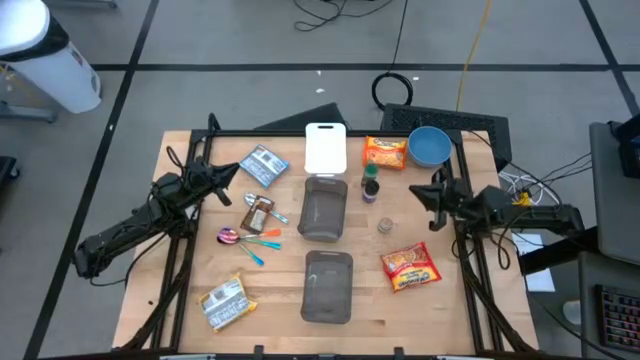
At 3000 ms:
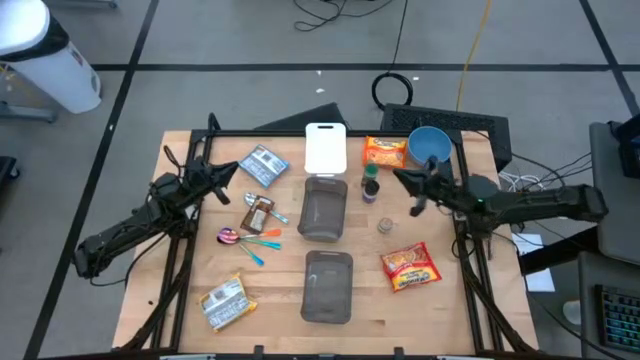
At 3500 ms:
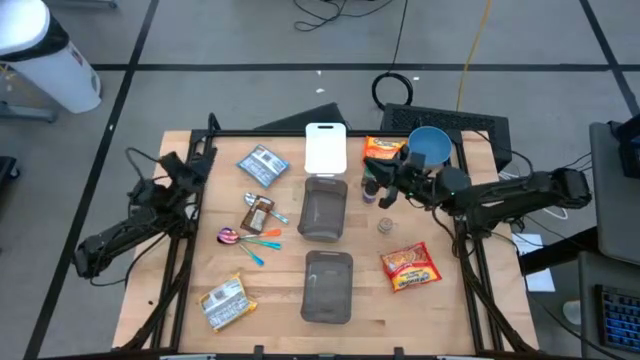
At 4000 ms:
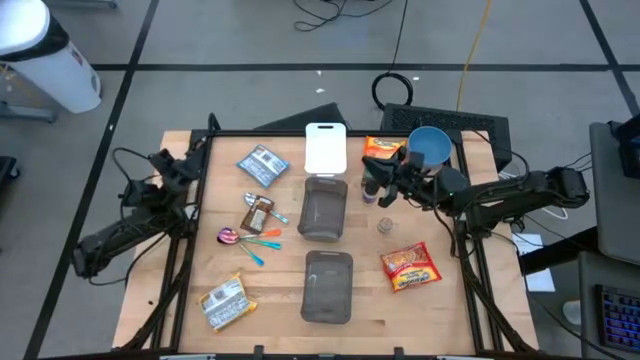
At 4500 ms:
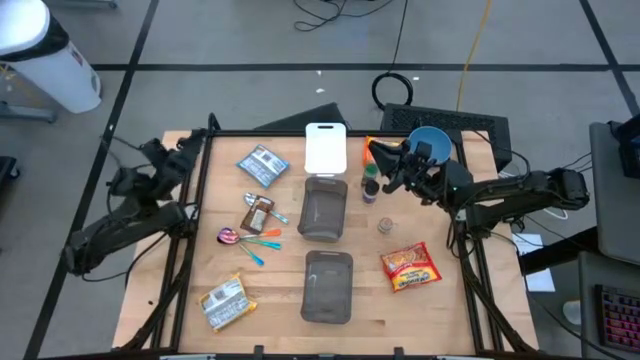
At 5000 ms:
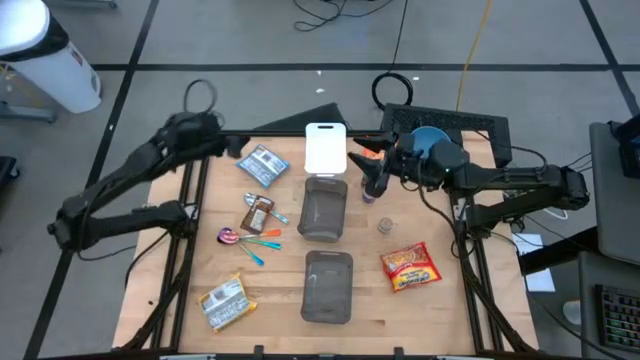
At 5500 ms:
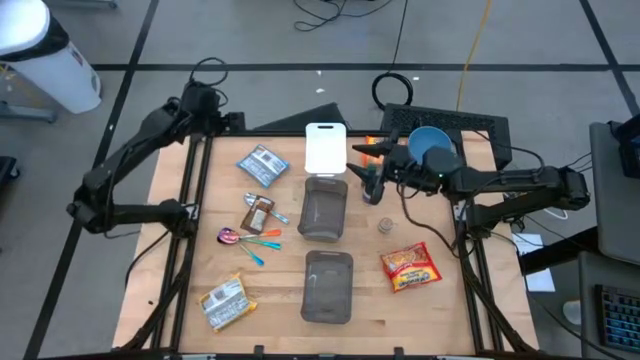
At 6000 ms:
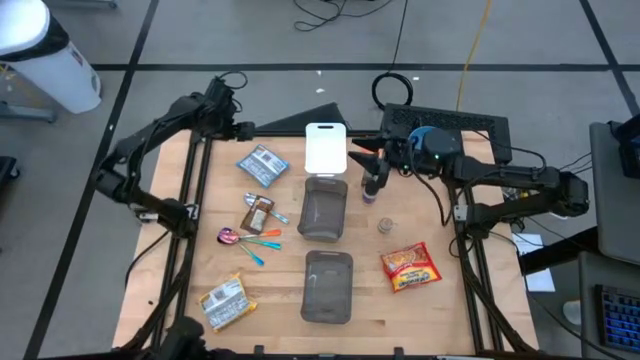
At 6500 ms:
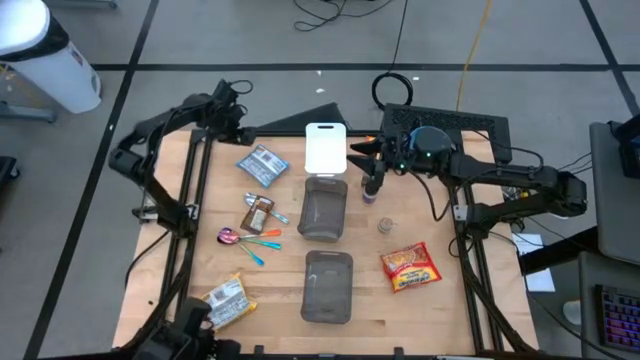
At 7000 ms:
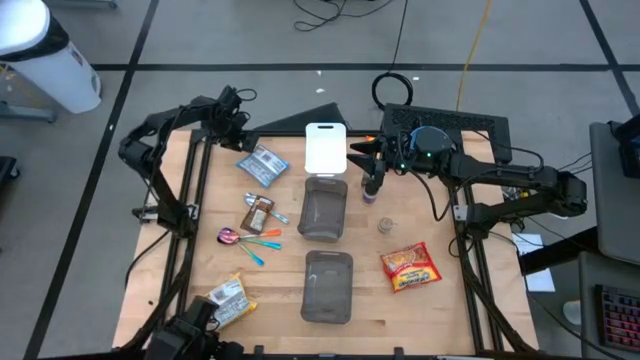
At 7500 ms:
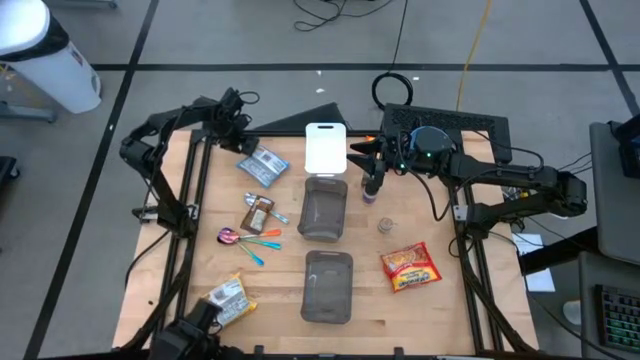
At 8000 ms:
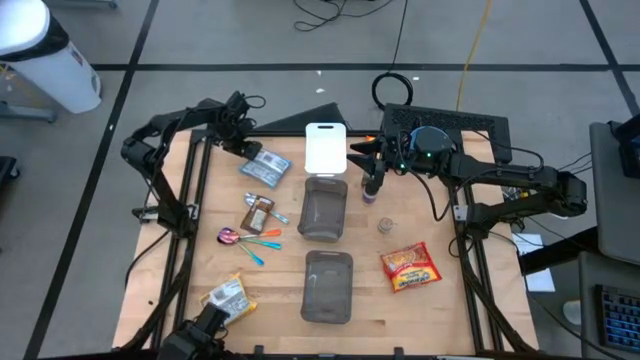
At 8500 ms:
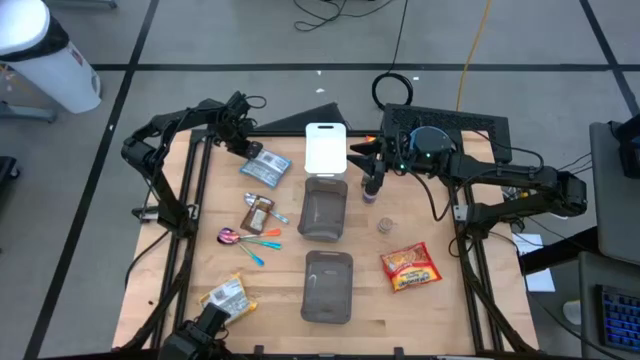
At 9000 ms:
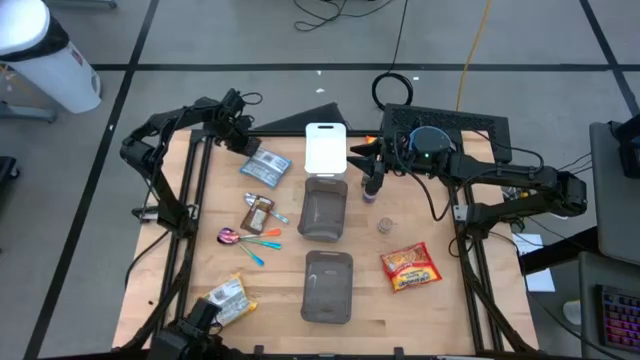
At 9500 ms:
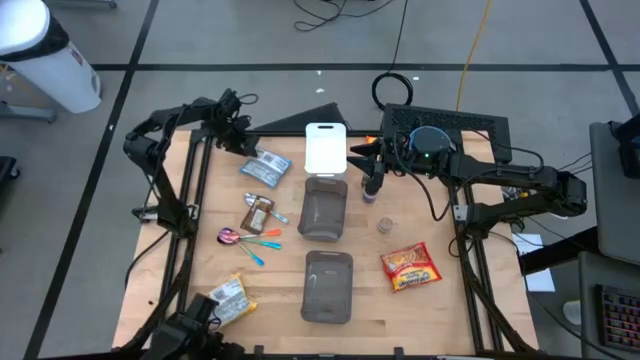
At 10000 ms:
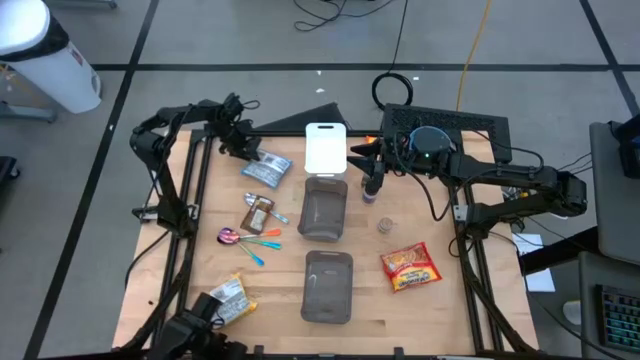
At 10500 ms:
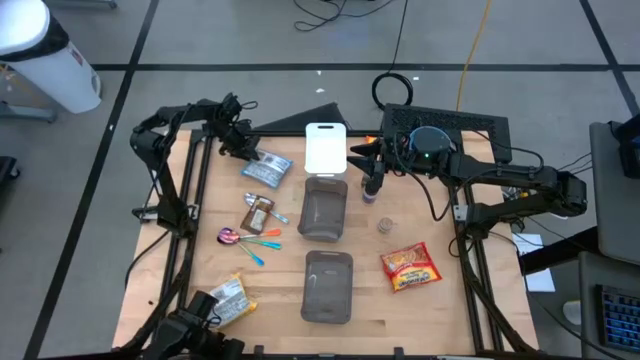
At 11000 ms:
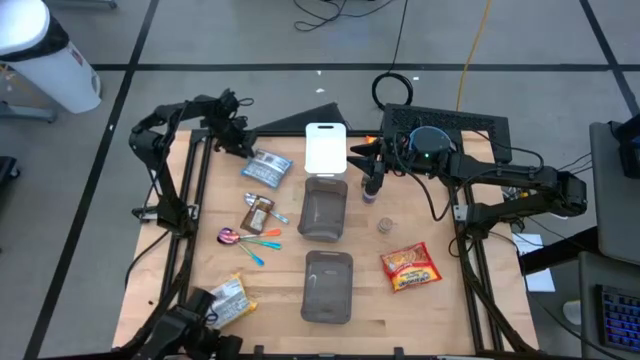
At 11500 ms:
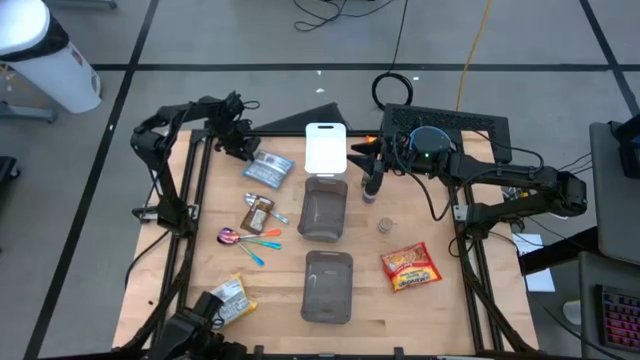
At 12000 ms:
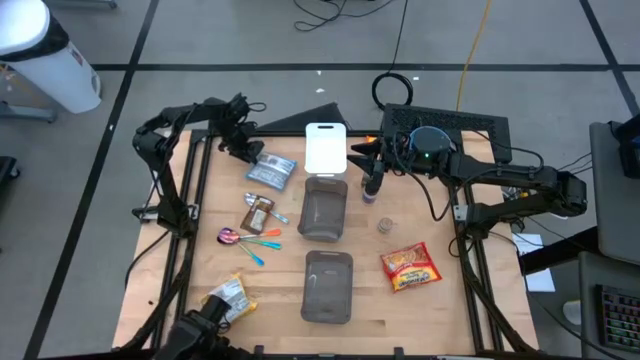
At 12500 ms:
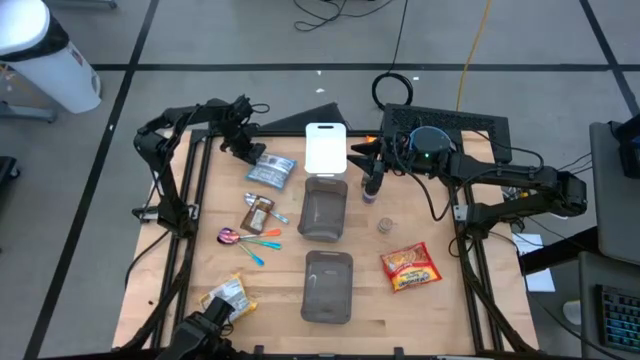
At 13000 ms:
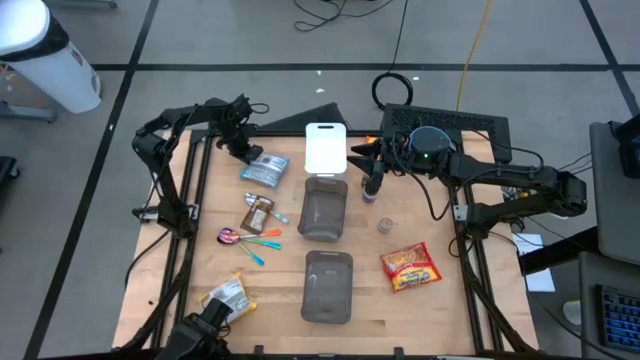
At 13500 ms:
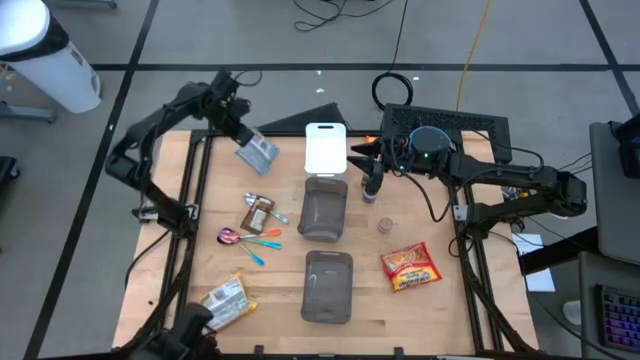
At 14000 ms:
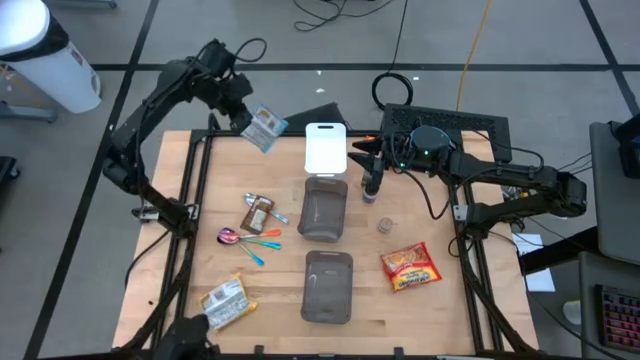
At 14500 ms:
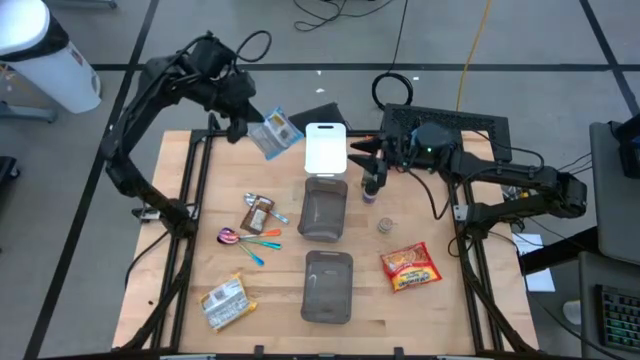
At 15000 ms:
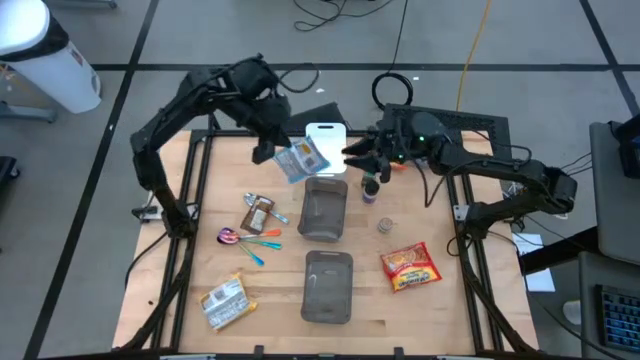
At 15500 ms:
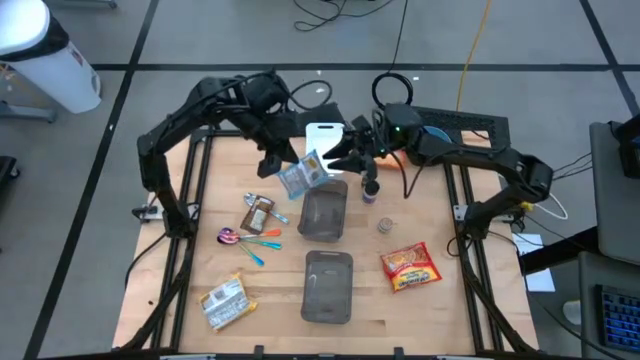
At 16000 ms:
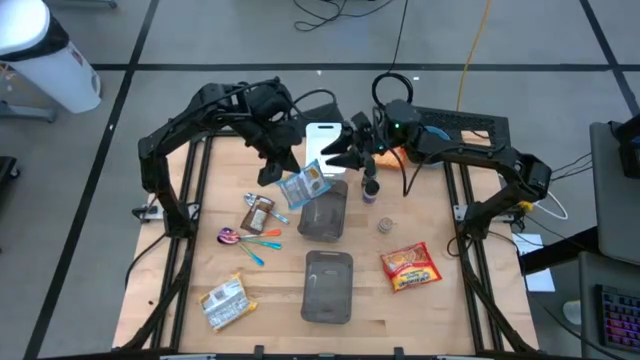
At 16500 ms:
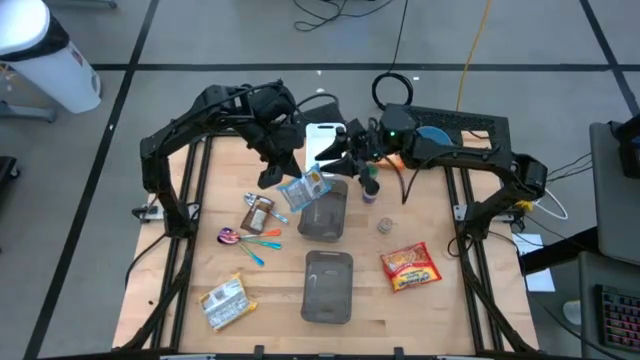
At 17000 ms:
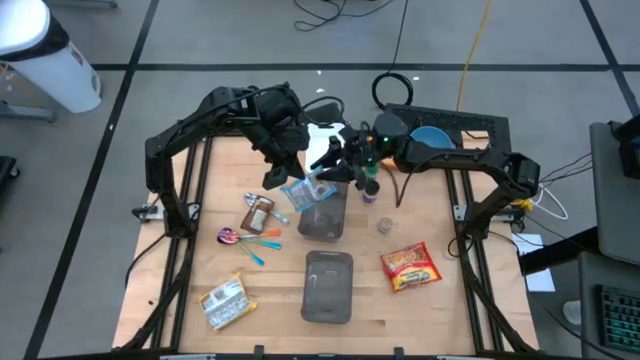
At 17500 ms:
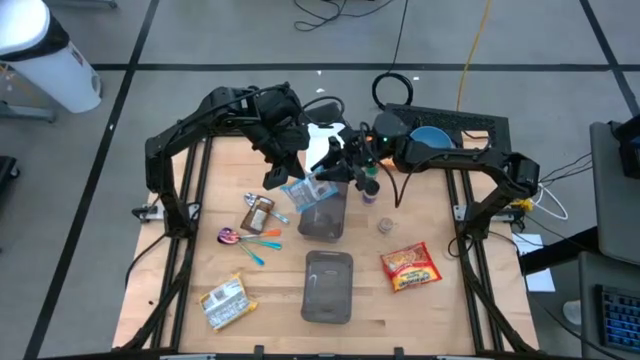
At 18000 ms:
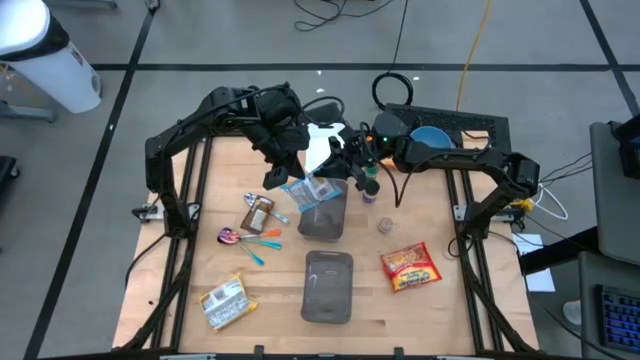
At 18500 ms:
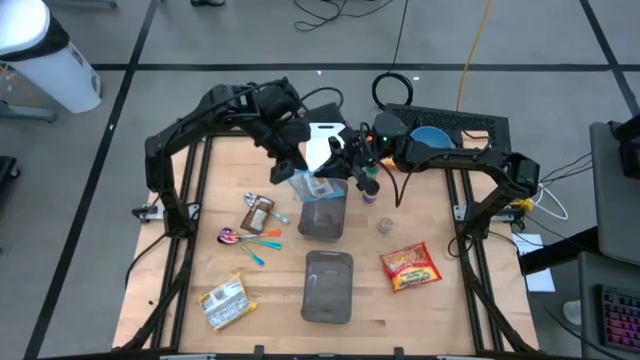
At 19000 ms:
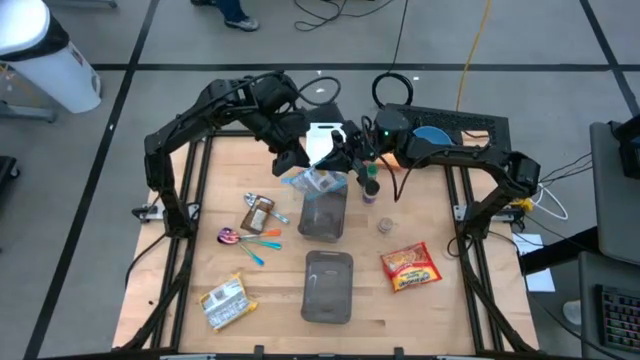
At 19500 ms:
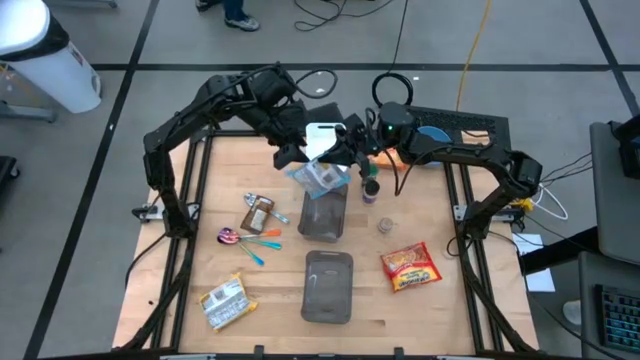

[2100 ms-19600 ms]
Task: Pick & Place Food Item
Put the blue noodle pack into the white bin

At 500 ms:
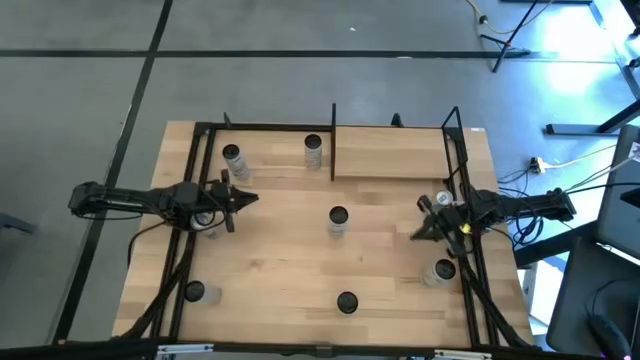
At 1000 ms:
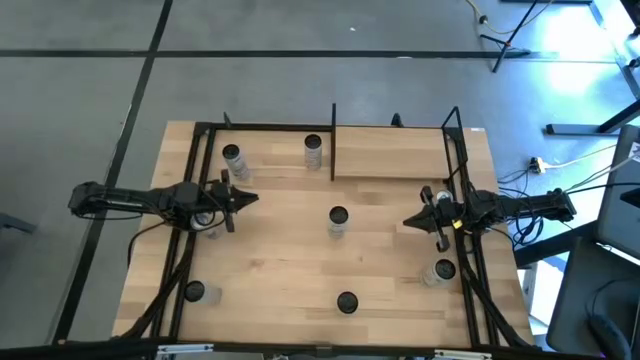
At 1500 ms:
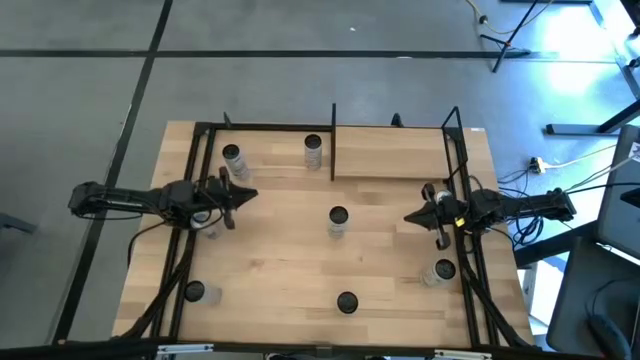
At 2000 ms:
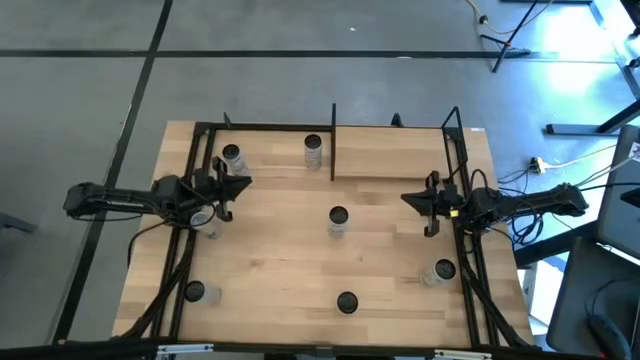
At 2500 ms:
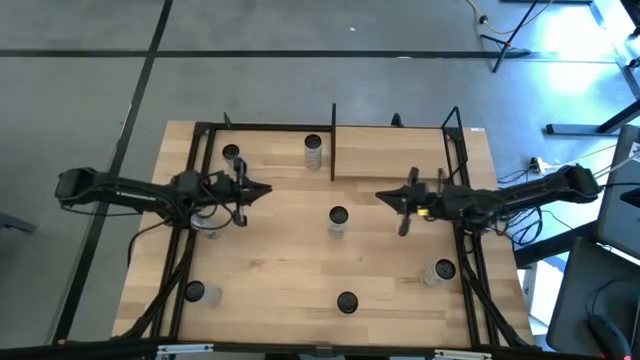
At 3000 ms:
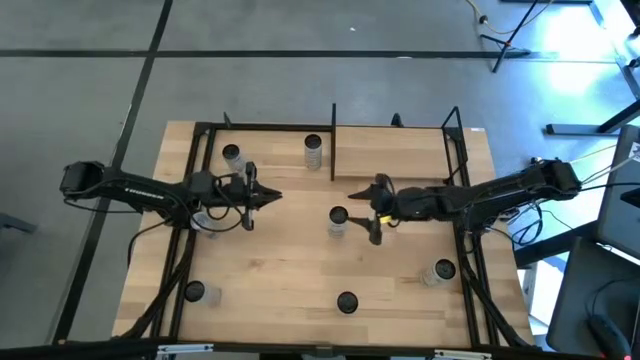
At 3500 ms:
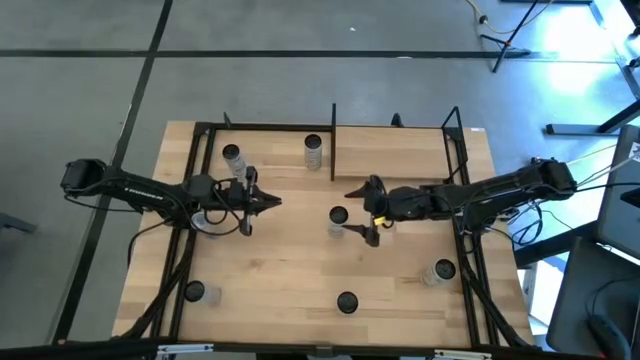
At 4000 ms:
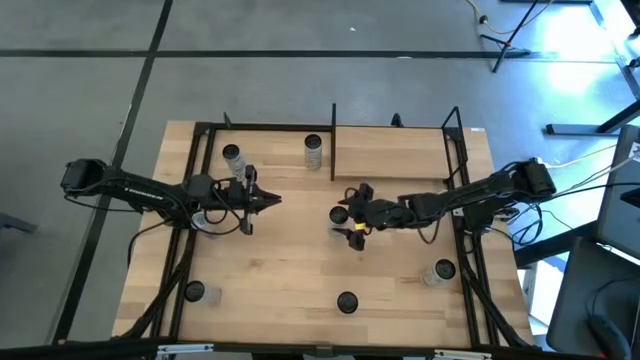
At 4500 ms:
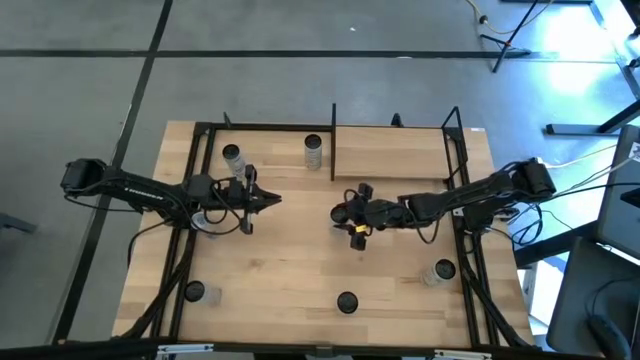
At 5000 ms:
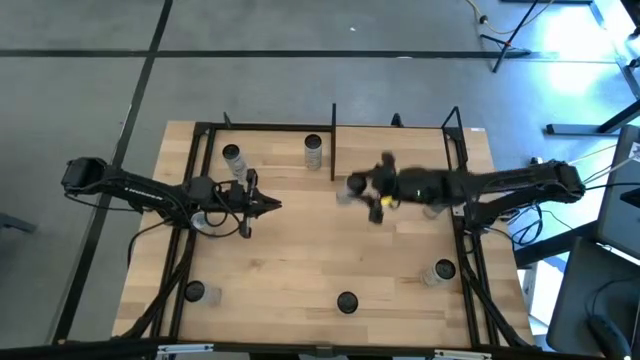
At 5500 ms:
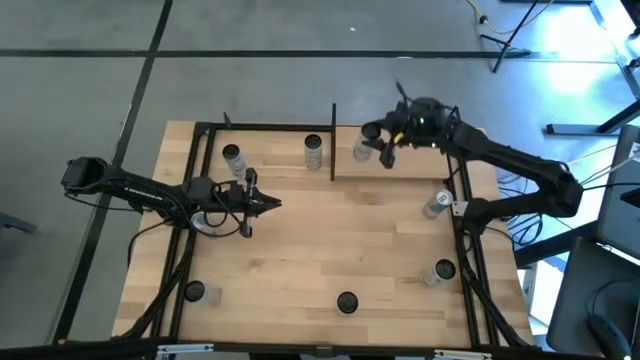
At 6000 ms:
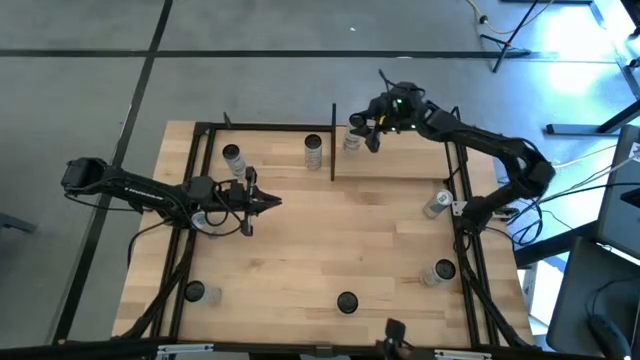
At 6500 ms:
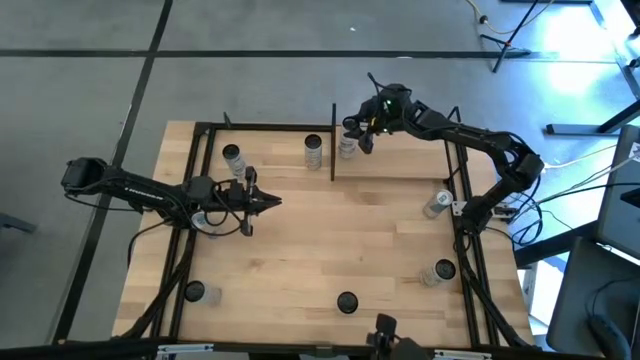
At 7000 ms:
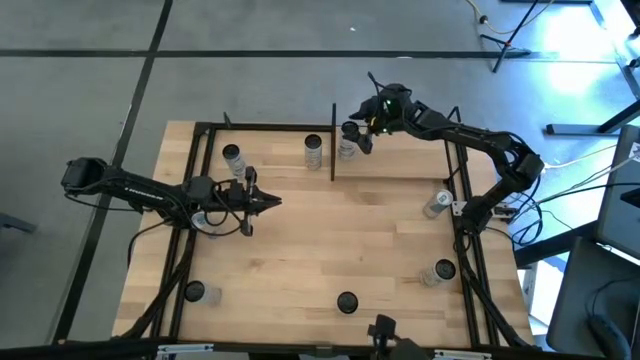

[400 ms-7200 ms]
Task: Place canned beverage on shelf
Put the bottom blue-white soda can on the shelf
